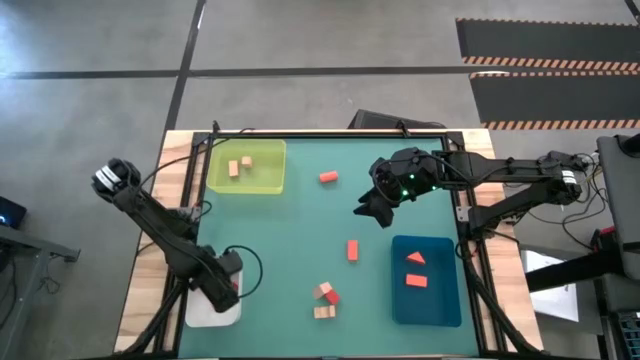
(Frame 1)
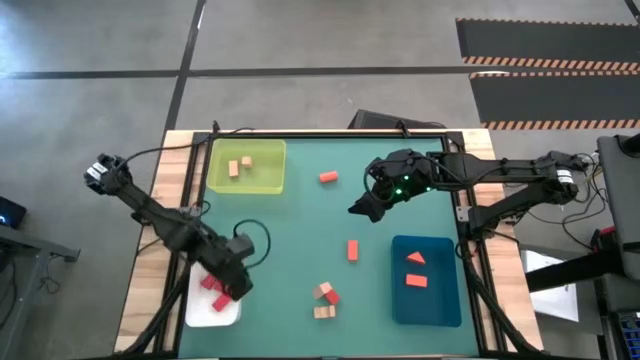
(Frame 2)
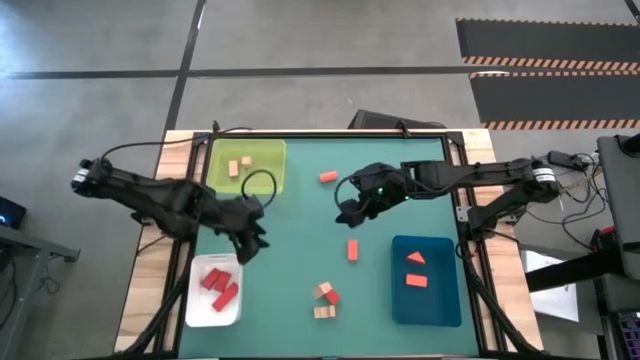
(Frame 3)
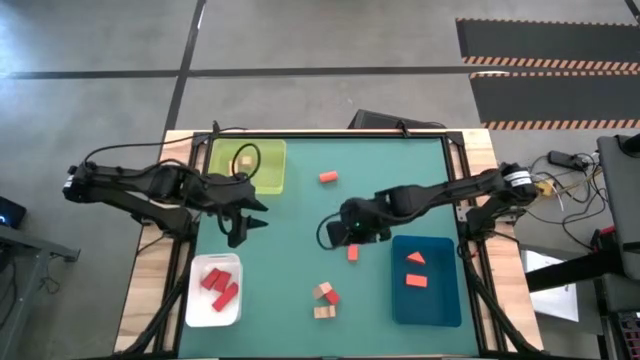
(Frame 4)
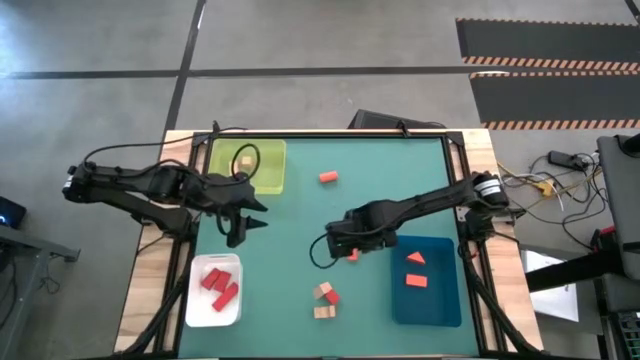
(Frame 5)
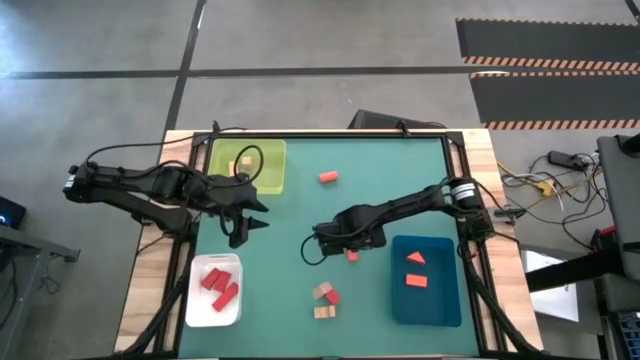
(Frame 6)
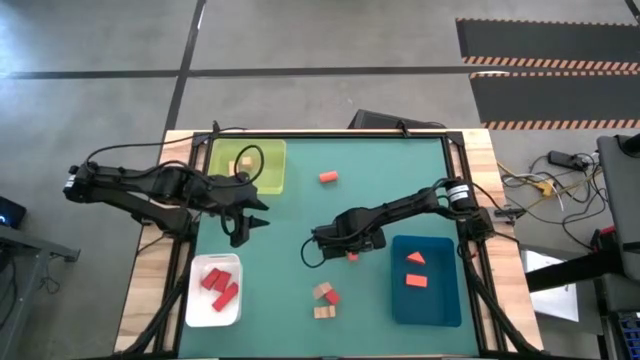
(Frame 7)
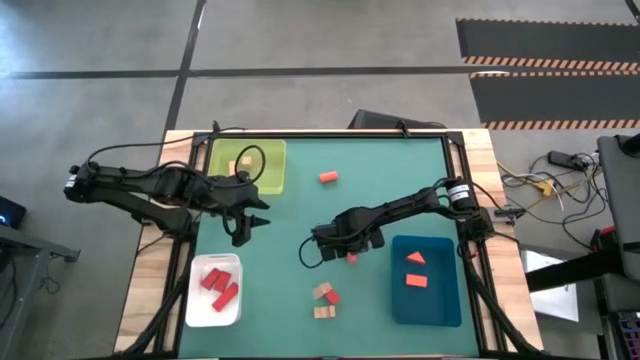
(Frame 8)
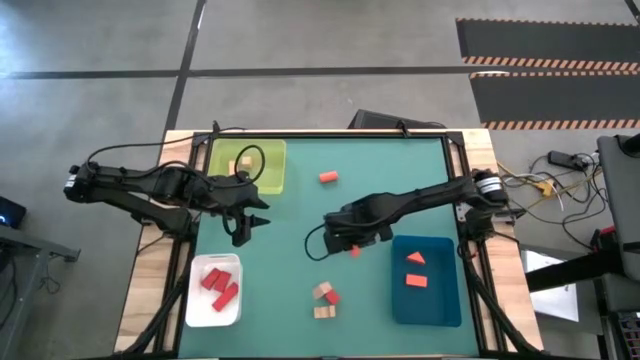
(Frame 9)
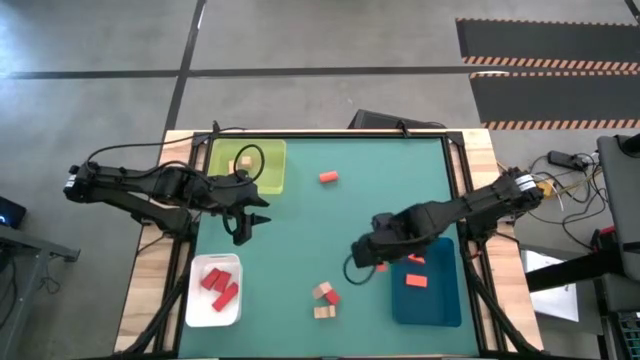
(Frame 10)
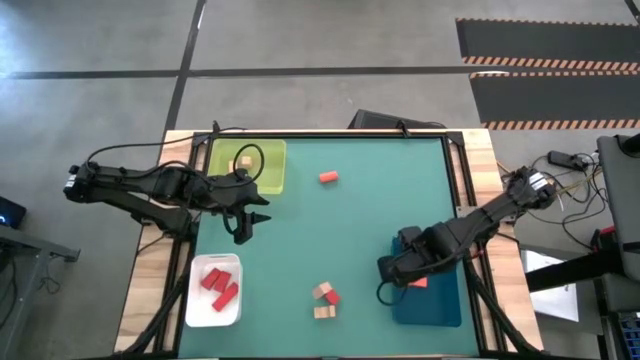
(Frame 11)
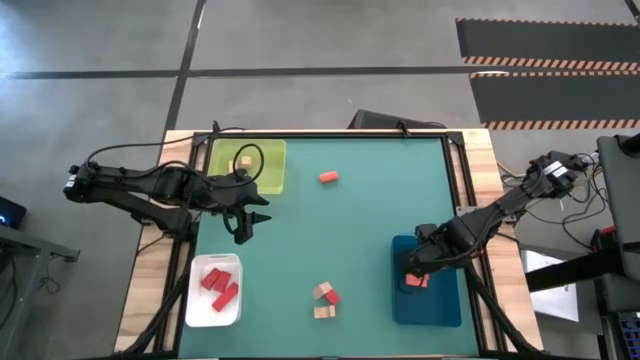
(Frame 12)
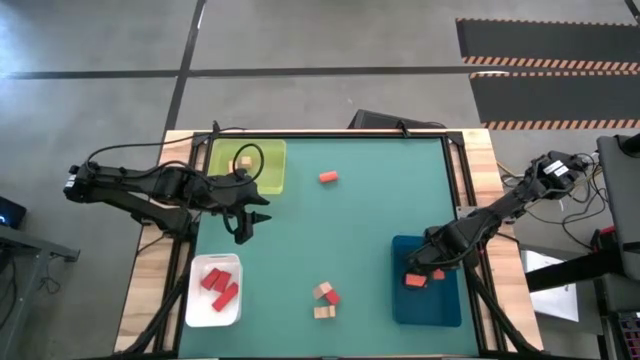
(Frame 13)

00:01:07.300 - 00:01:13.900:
Task: Sort & place blocks by color
Put the orange block into the blue bin

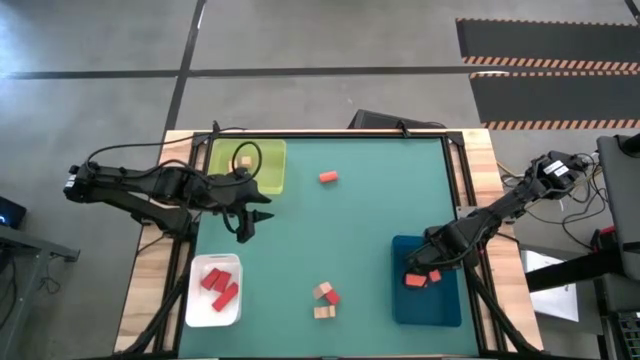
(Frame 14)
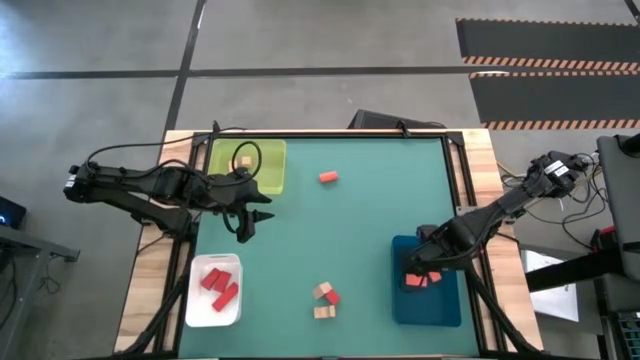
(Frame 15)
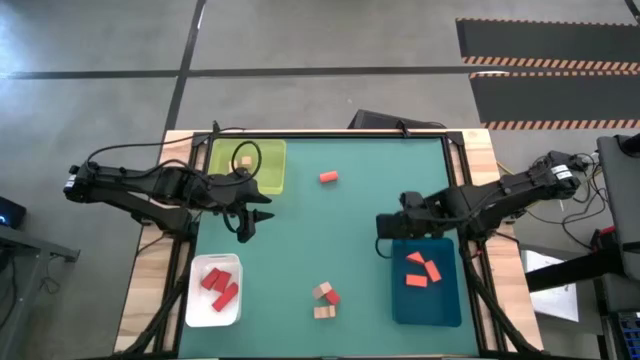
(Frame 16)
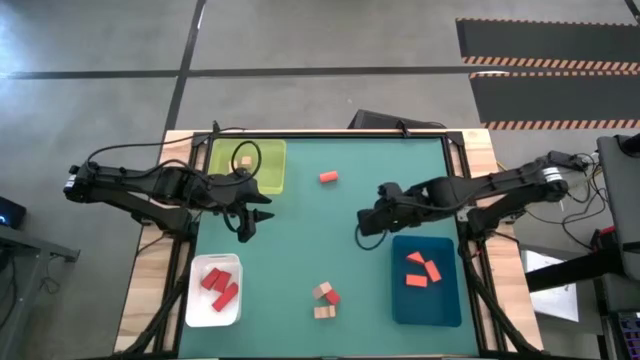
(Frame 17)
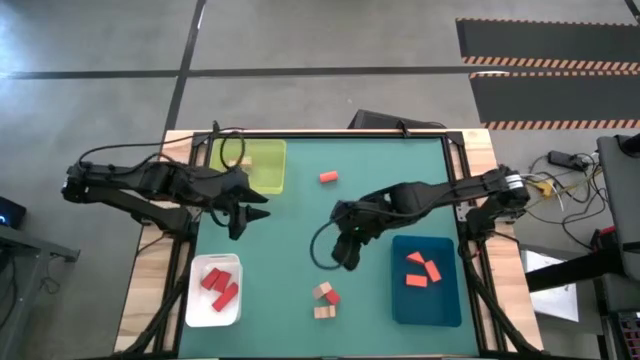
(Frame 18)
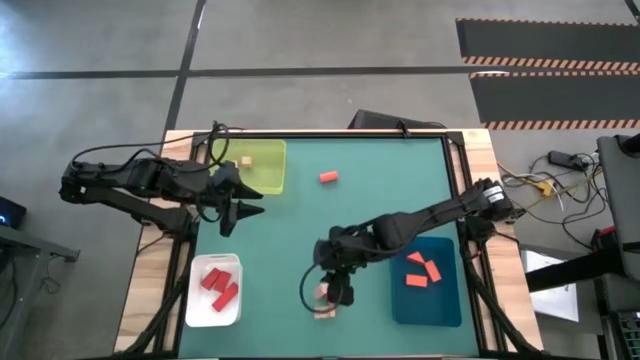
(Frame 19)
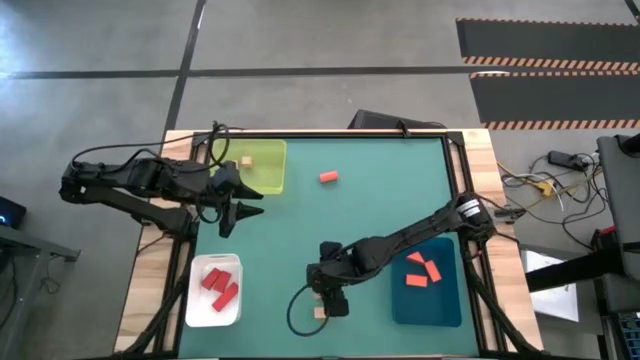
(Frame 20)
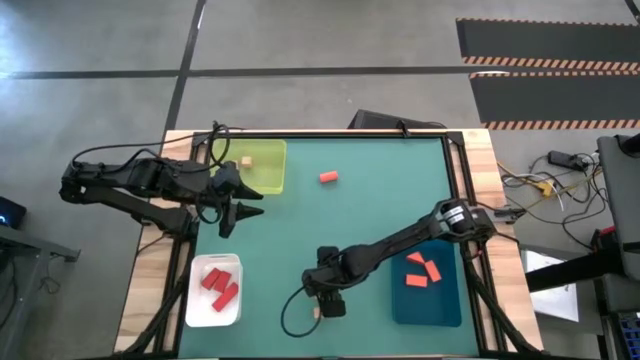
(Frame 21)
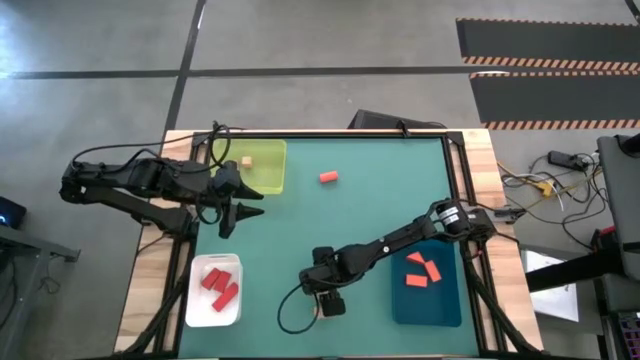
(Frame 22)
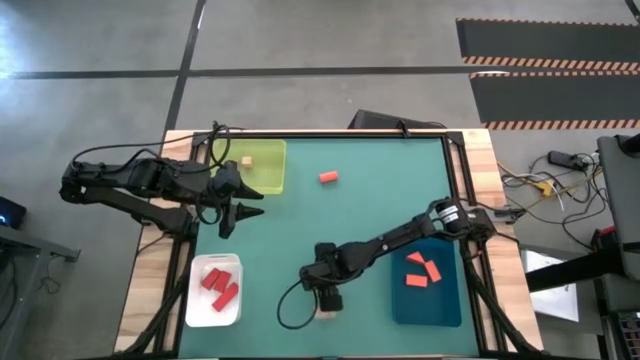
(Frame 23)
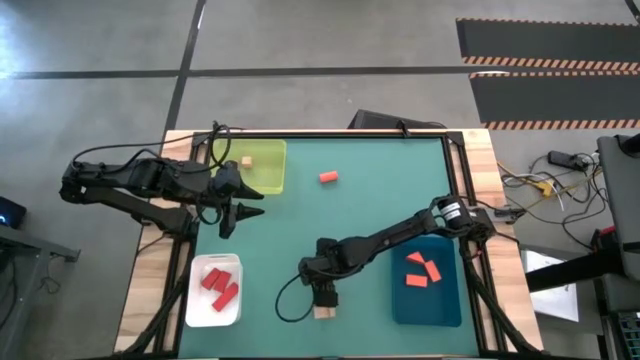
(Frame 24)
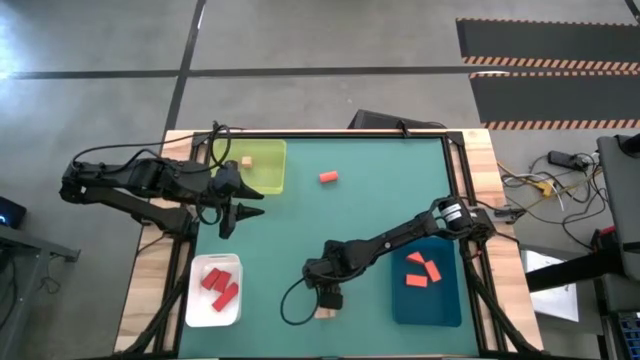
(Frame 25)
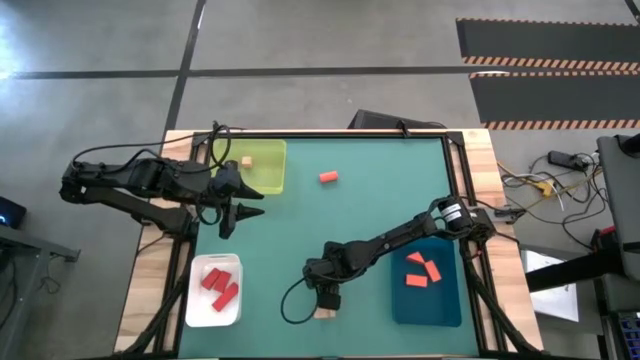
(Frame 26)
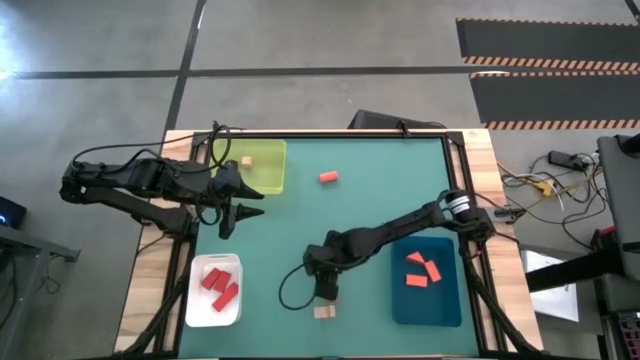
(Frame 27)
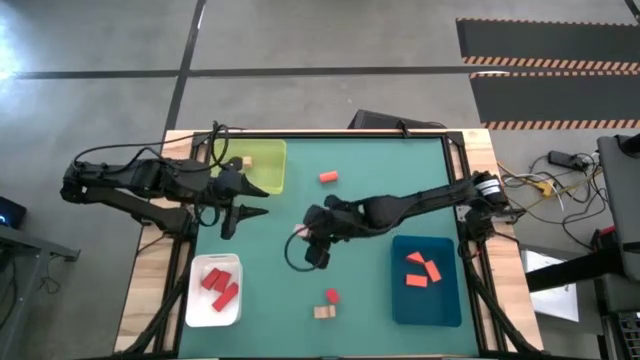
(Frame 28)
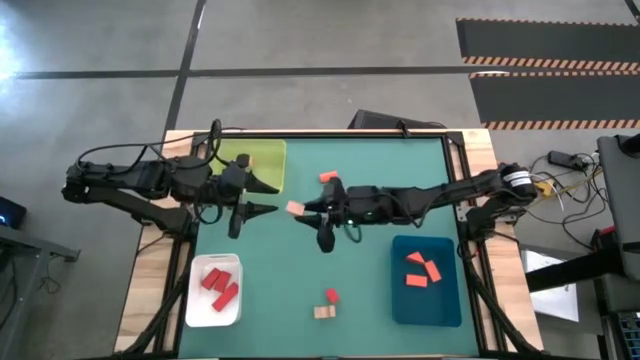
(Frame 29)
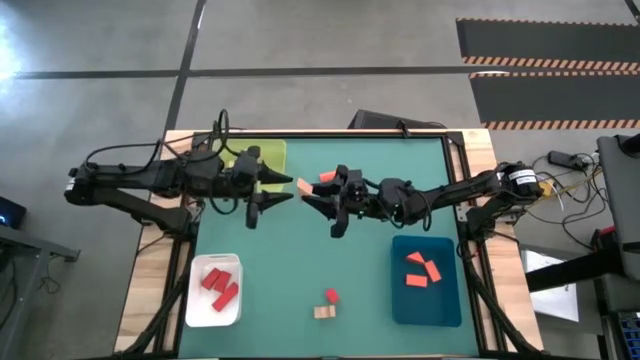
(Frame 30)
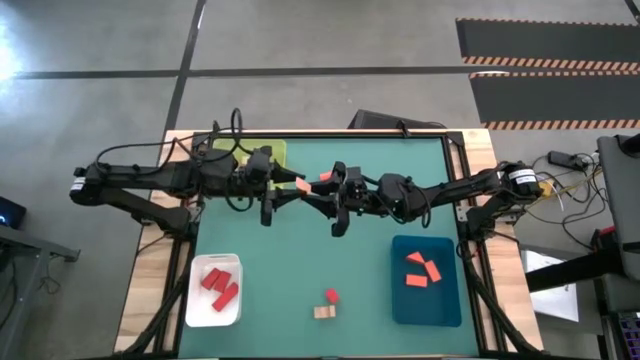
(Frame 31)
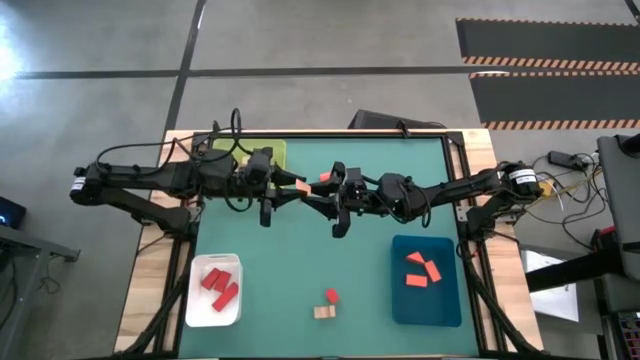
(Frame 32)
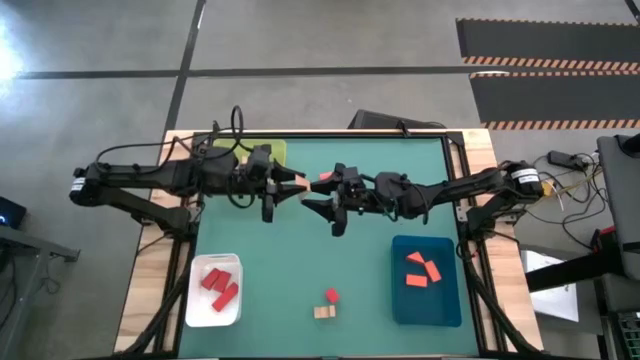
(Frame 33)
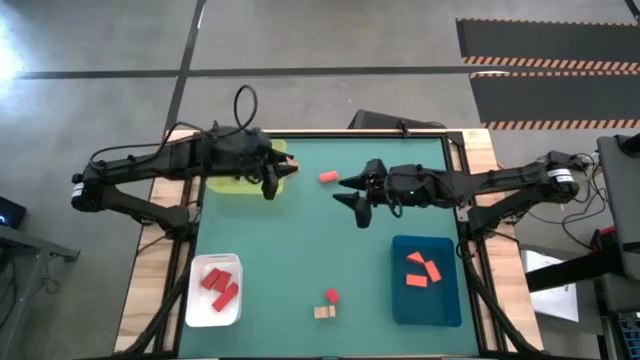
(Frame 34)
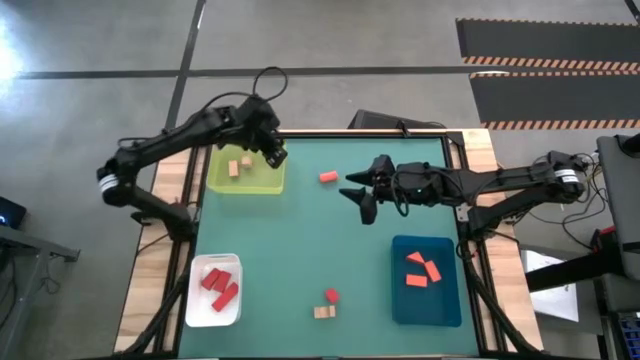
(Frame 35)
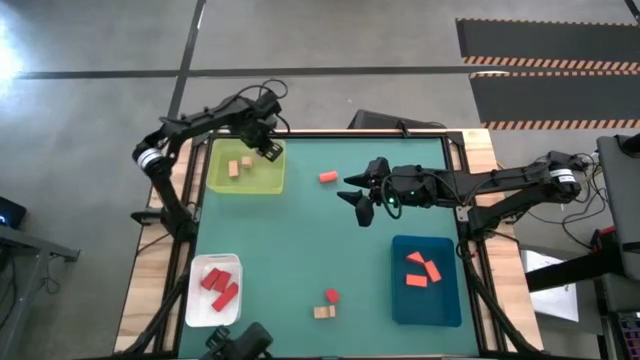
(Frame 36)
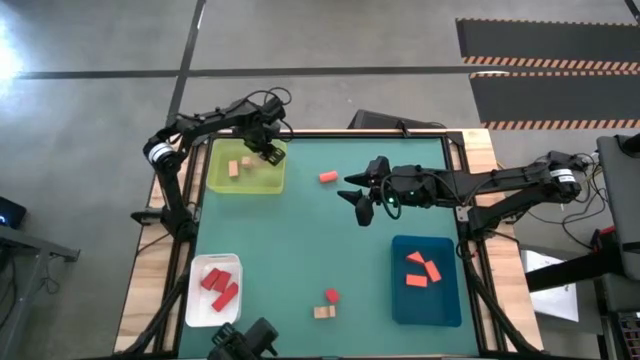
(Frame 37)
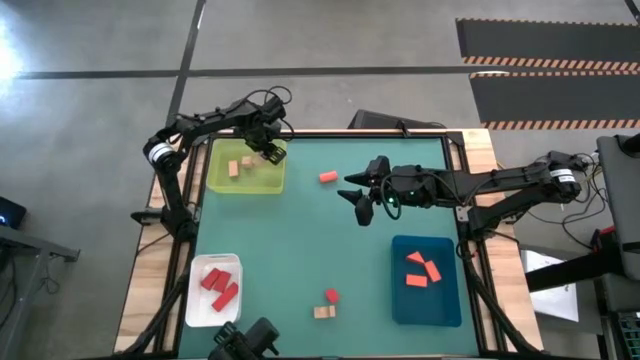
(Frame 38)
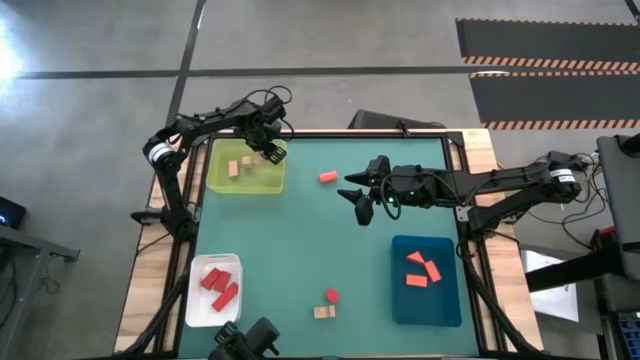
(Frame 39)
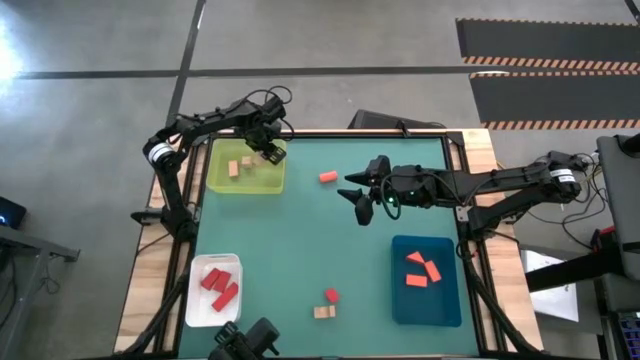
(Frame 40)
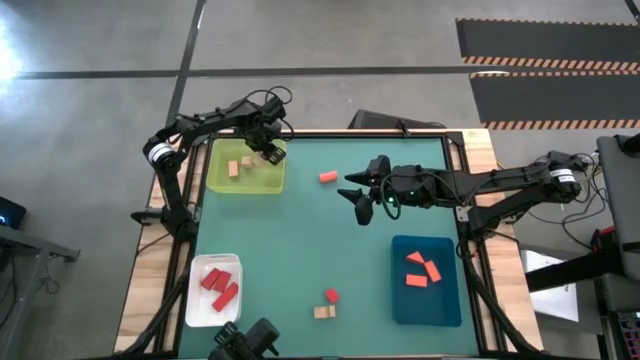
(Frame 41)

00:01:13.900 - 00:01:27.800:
Put the light brown block into the yellow bin

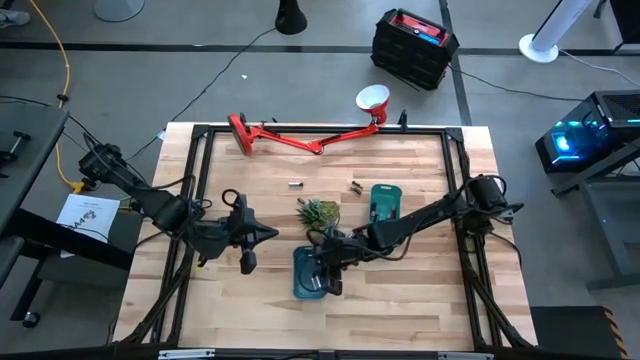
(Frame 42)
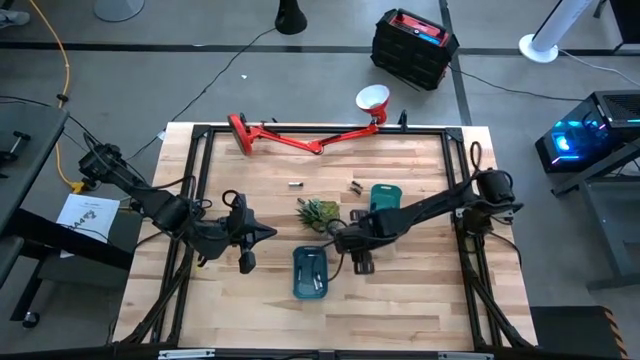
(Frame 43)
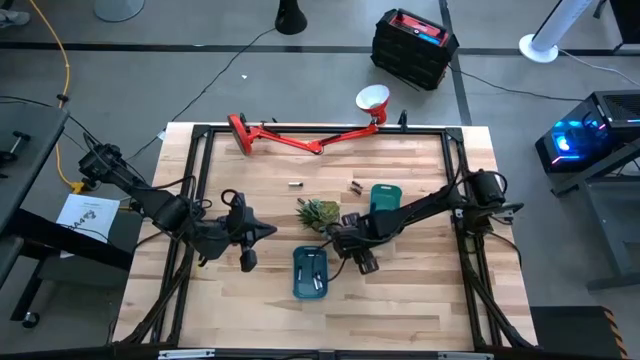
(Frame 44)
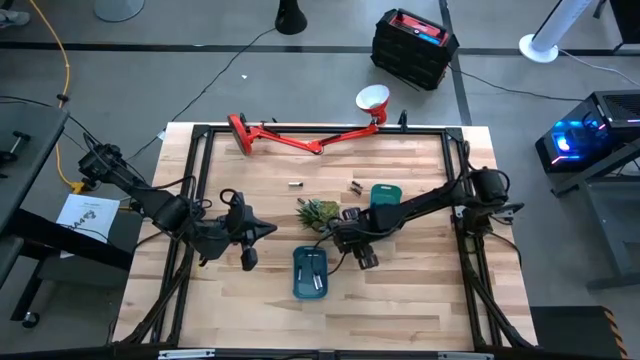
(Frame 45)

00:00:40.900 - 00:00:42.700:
Task: Sort batteries
Put the silver battery into the blue bin
